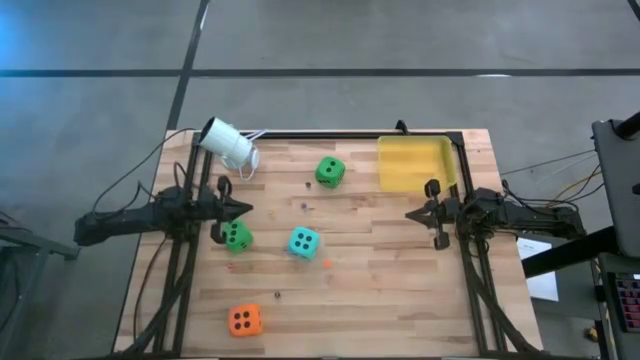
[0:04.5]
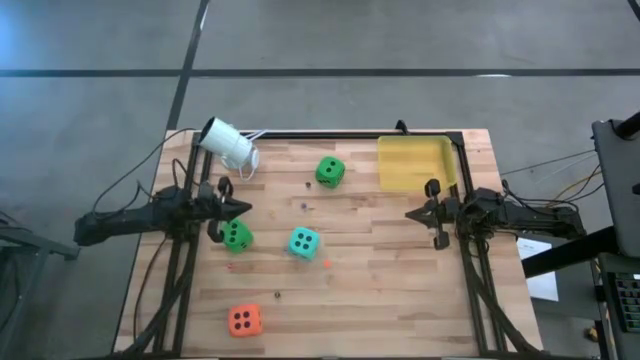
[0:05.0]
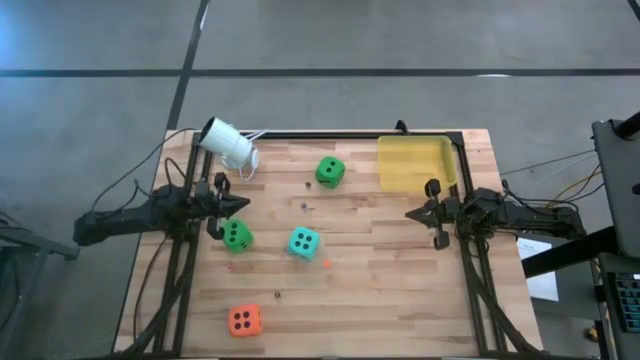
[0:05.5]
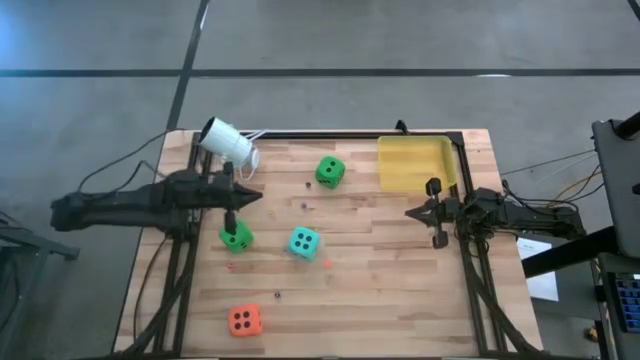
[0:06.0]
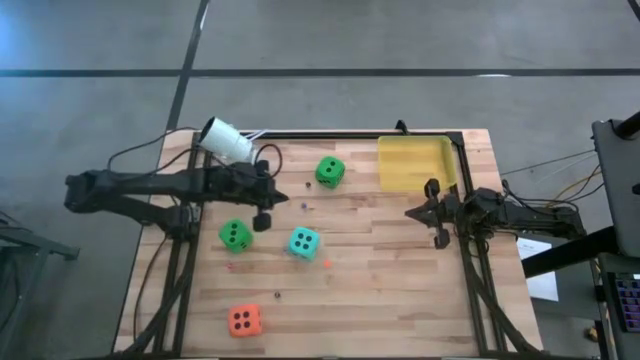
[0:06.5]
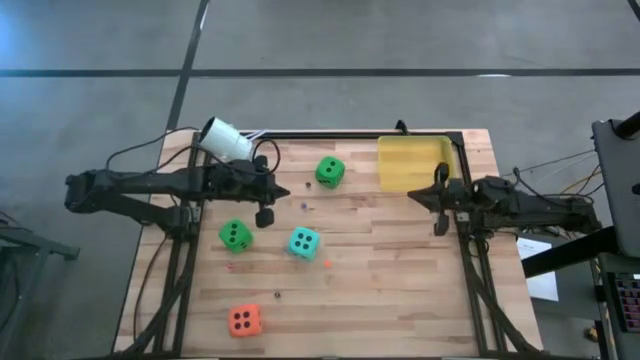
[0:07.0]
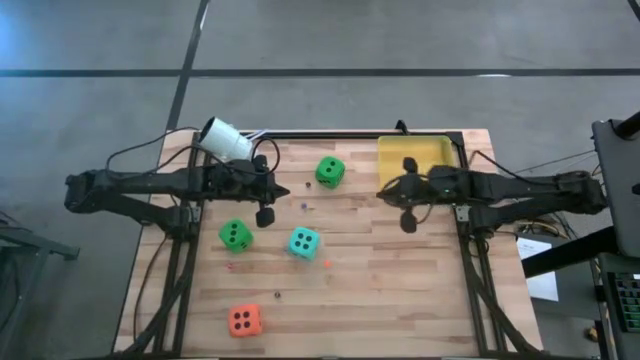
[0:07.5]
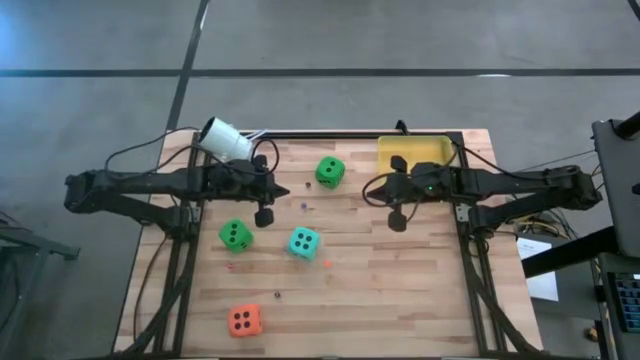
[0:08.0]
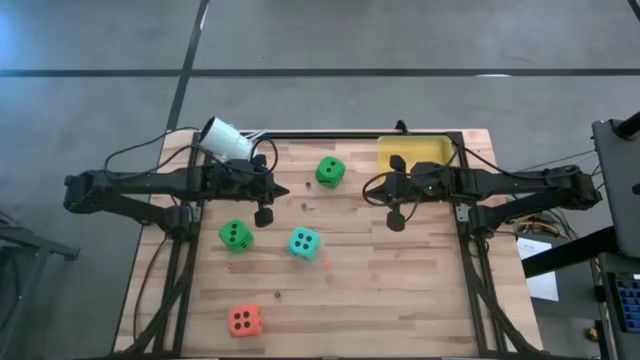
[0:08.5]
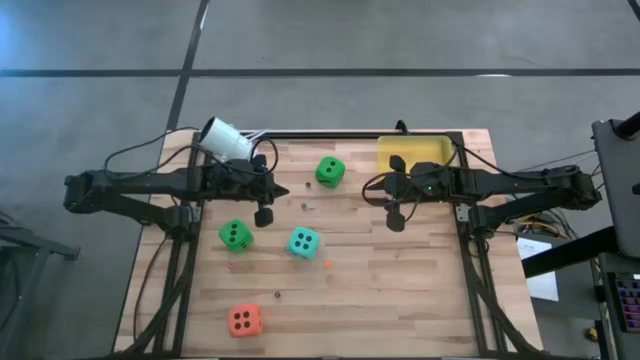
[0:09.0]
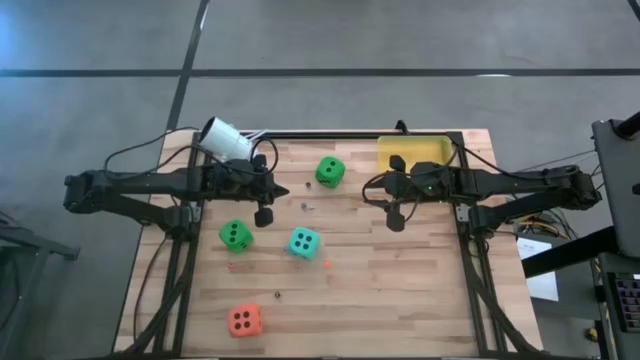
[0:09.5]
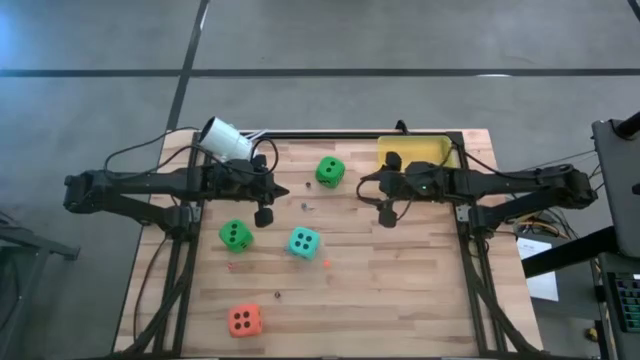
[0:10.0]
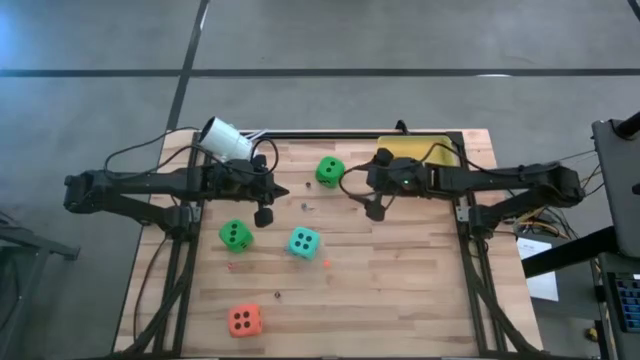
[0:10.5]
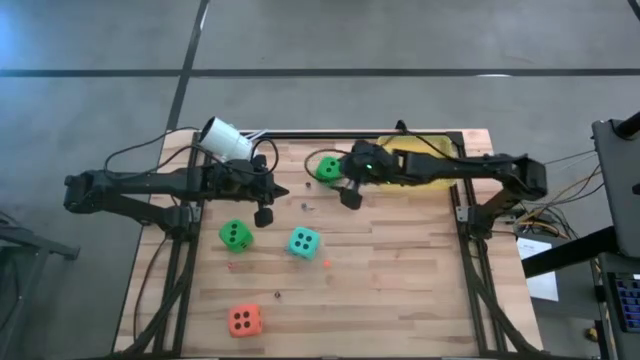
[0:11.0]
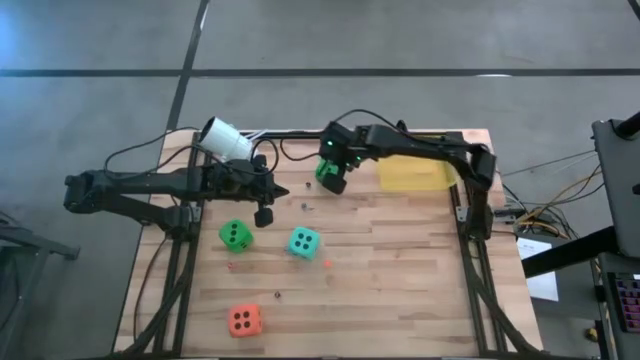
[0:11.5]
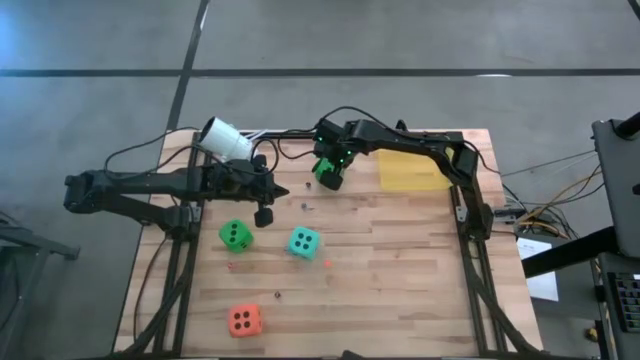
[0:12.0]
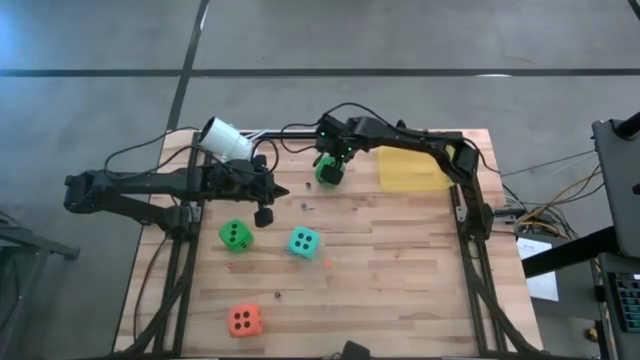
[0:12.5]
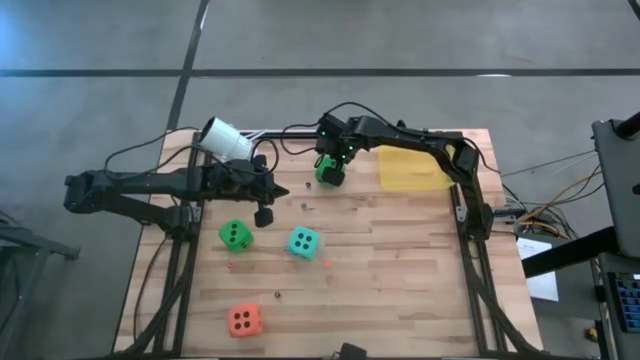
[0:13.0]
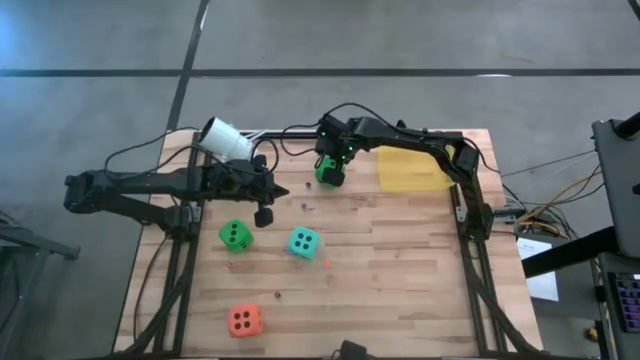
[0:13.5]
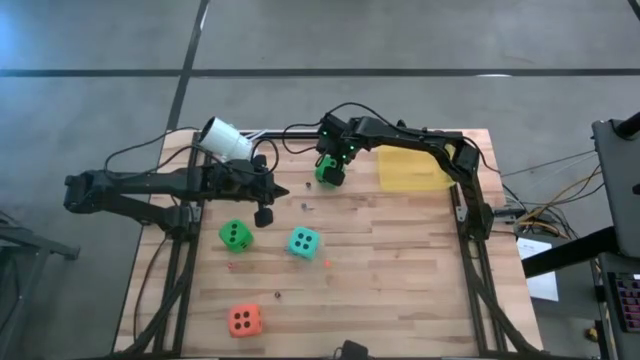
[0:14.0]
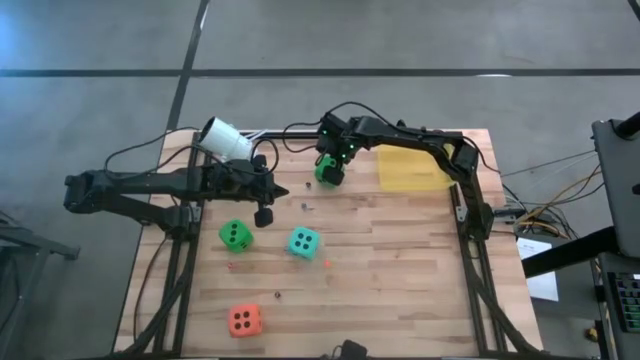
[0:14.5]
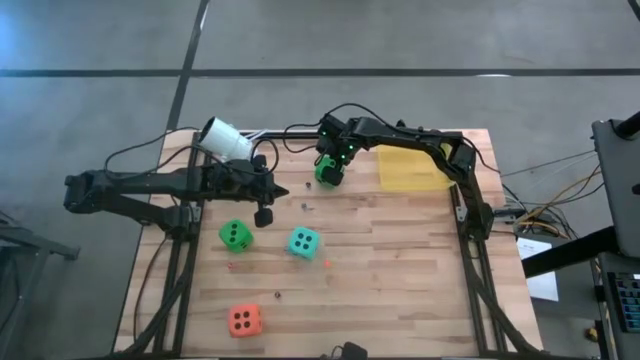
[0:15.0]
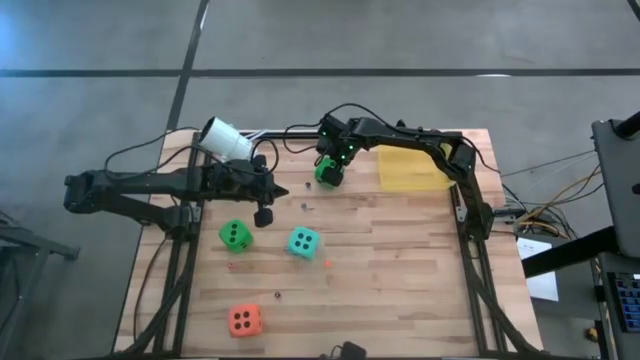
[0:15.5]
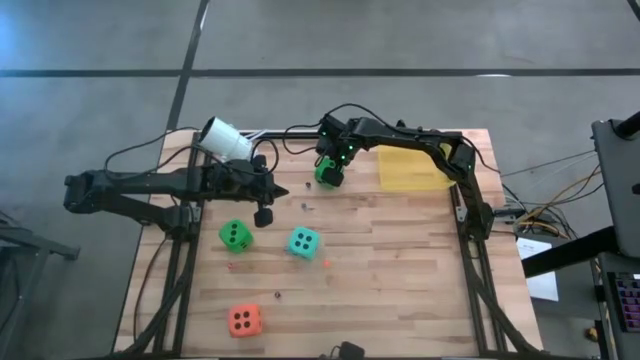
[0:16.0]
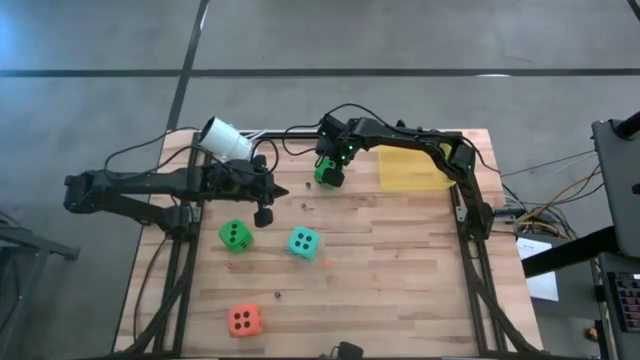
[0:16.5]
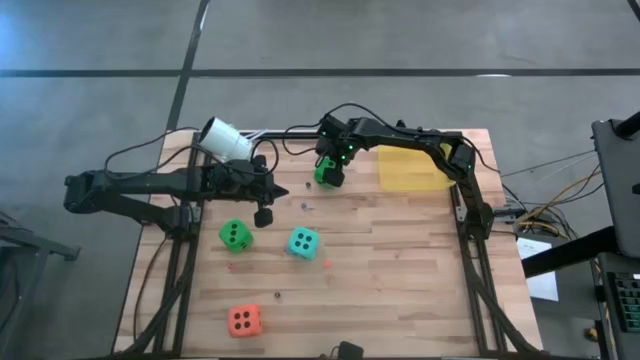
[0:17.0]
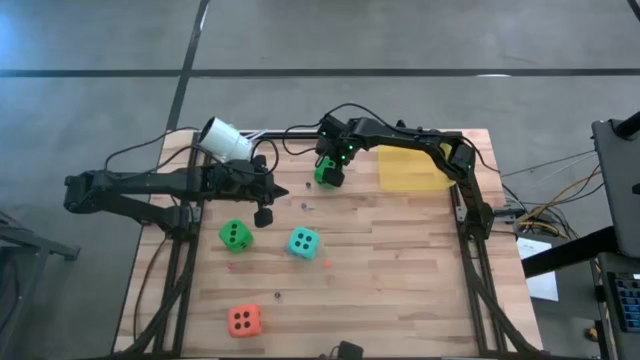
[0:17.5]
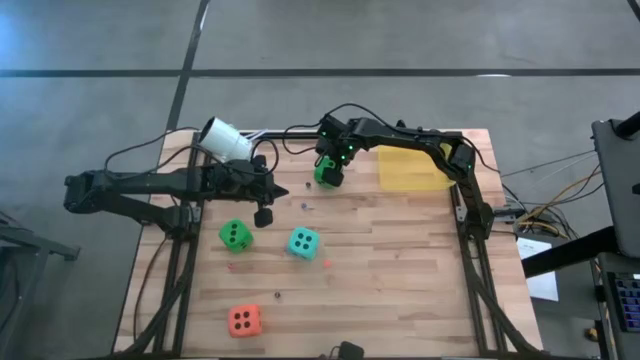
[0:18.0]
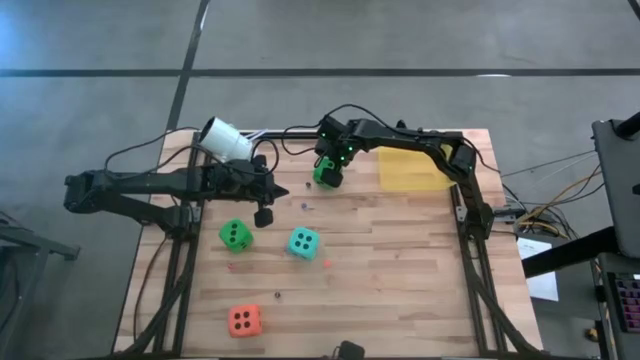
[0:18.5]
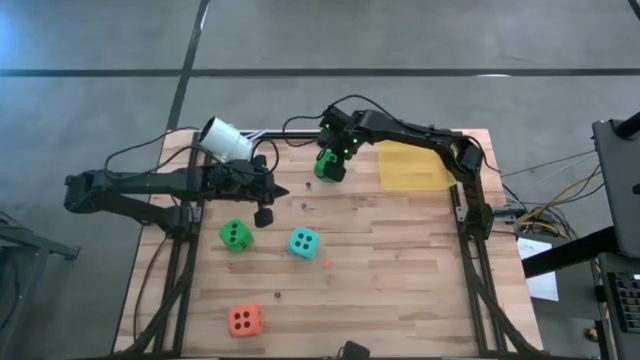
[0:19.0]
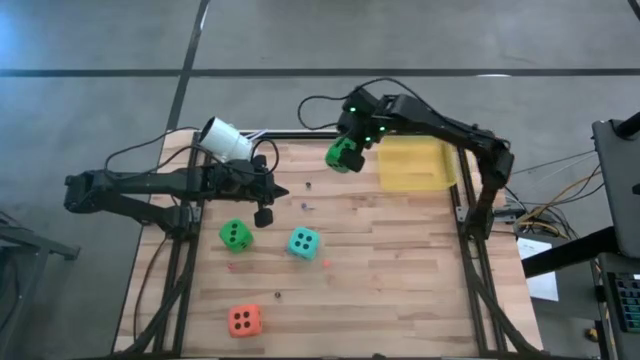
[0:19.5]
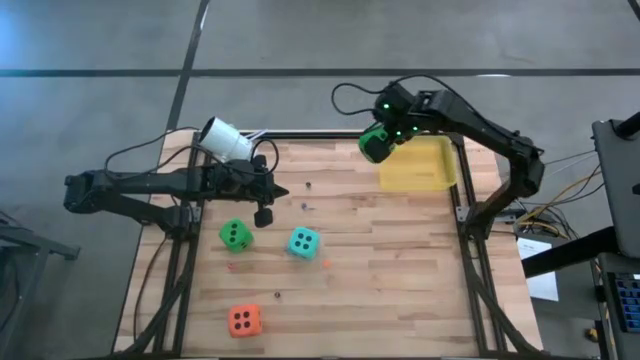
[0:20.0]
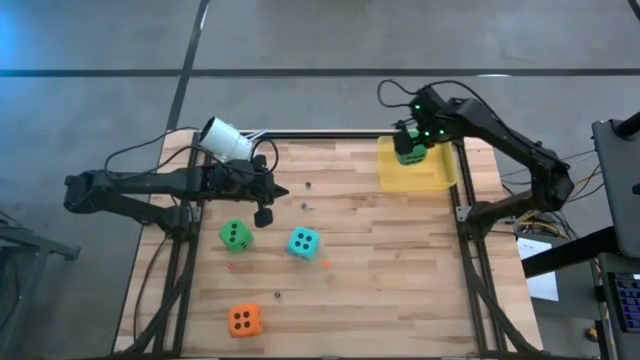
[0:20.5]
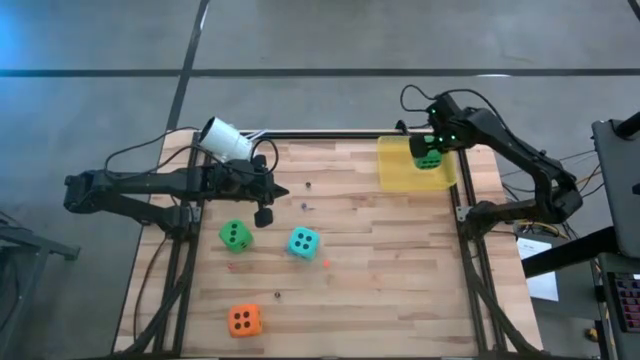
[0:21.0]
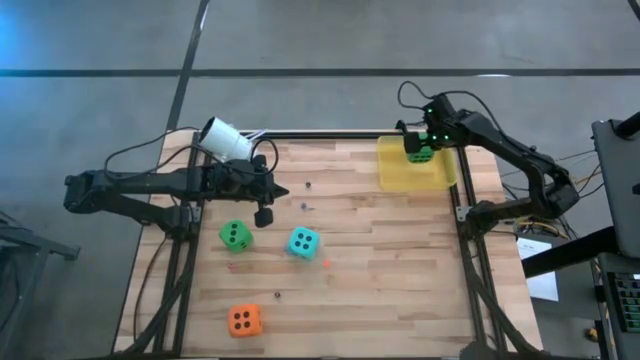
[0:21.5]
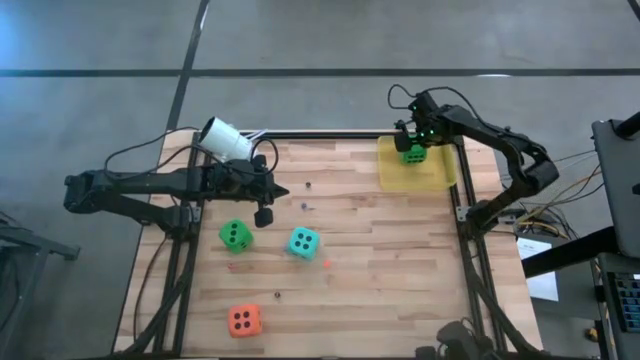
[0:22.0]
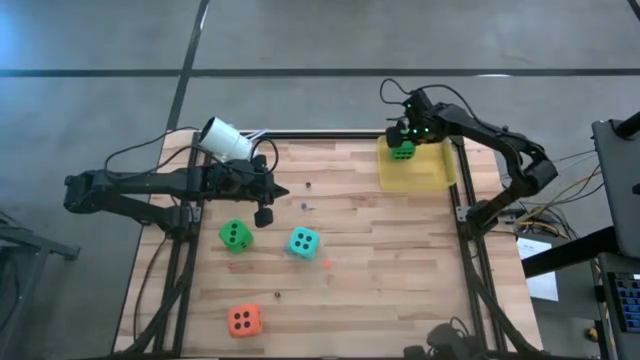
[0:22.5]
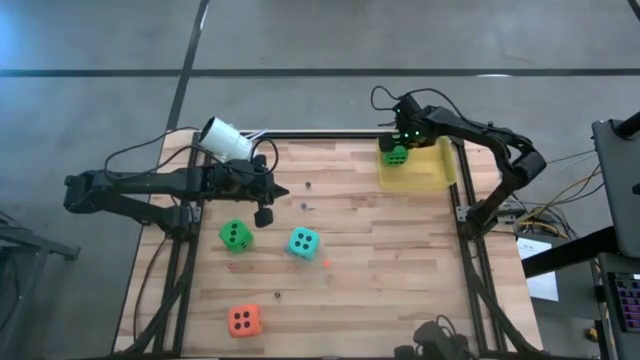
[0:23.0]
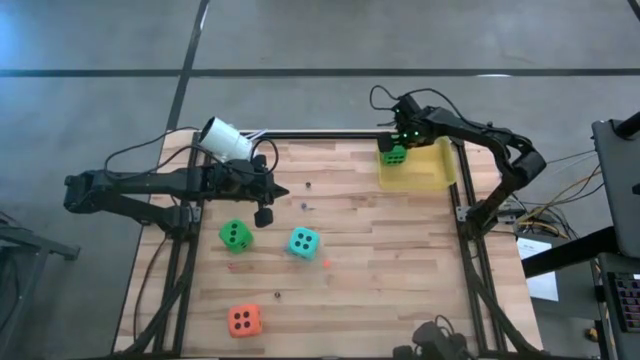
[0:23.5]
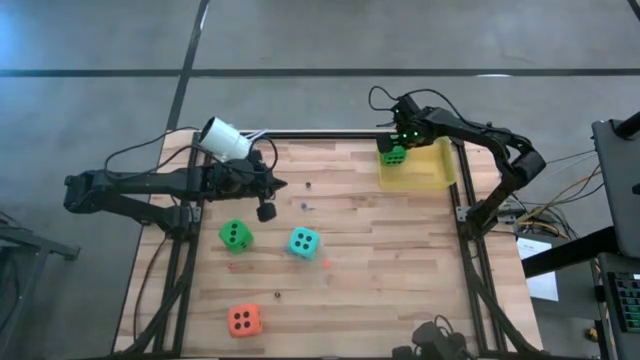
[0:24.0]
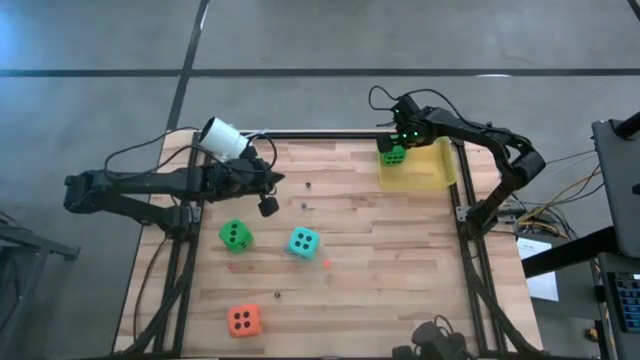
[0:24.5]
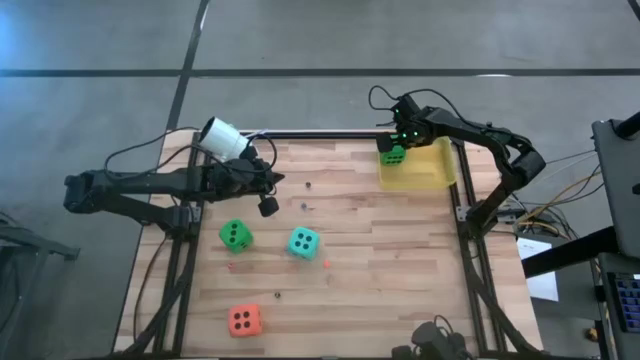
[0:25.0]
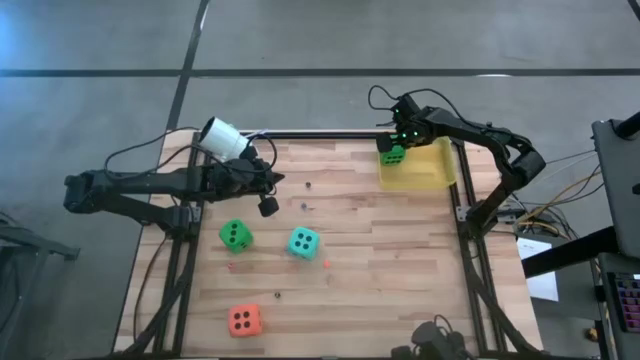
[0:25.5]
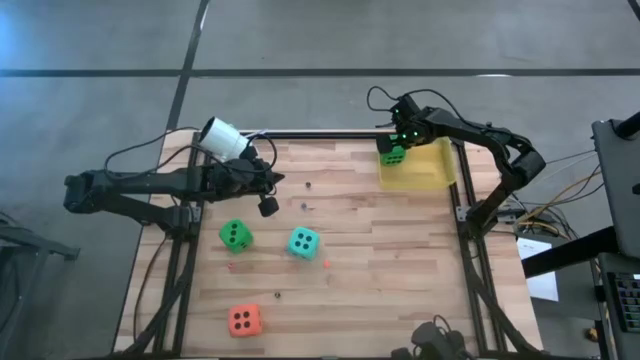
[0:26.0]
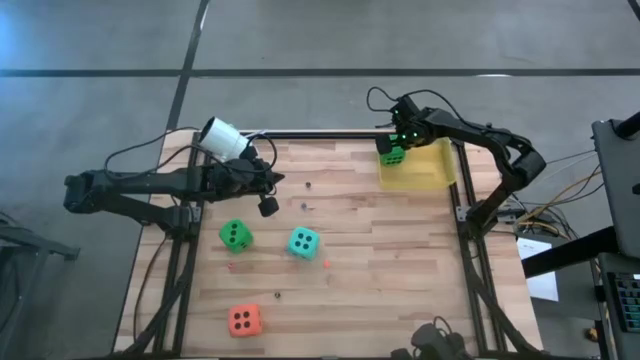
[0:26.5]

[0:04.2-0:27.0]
Task: Pick & Place Dice
Put the large green dice into the yellow transparent bin
